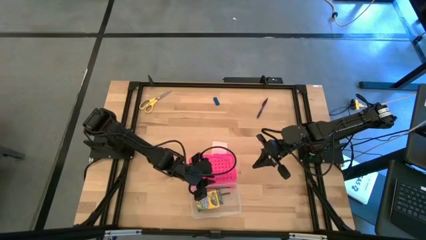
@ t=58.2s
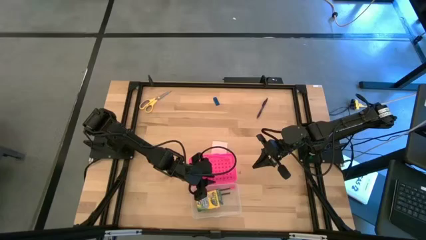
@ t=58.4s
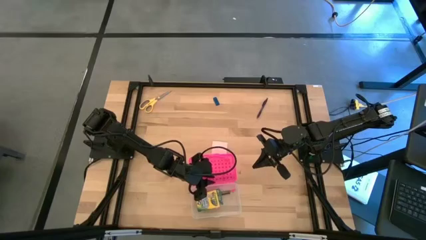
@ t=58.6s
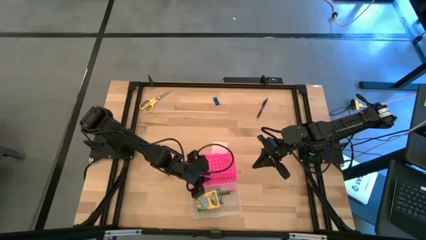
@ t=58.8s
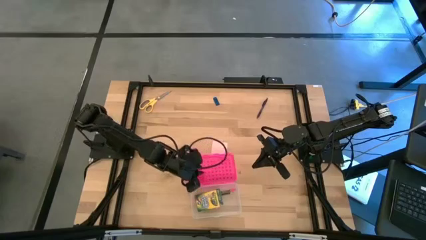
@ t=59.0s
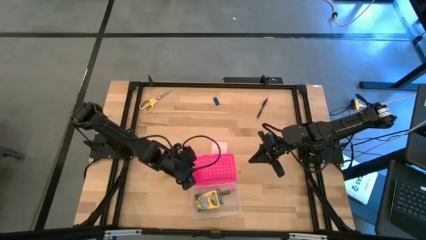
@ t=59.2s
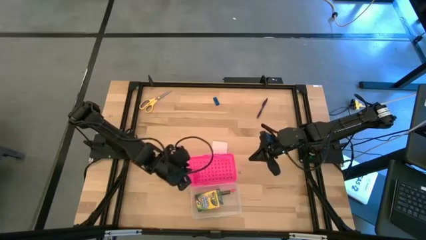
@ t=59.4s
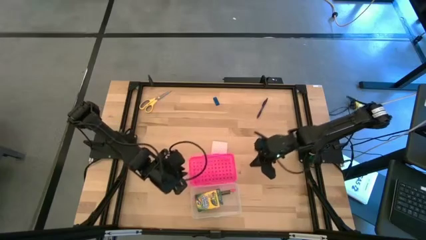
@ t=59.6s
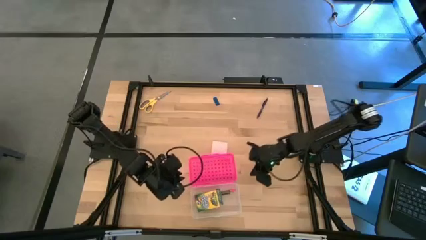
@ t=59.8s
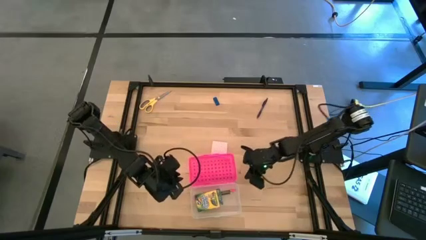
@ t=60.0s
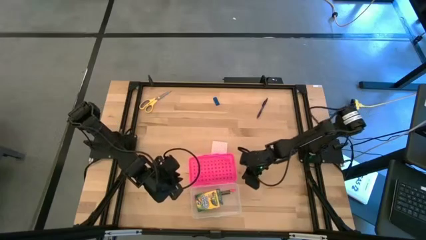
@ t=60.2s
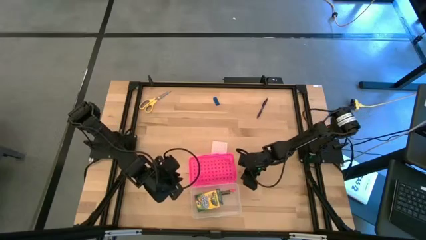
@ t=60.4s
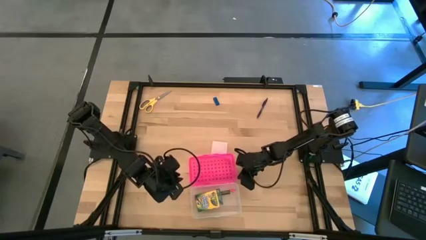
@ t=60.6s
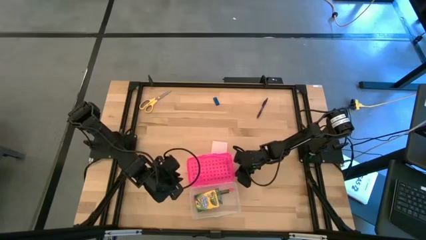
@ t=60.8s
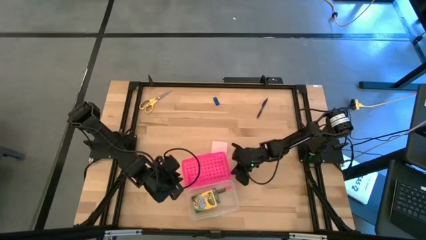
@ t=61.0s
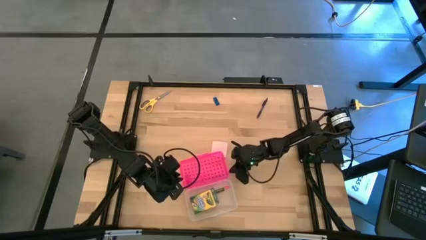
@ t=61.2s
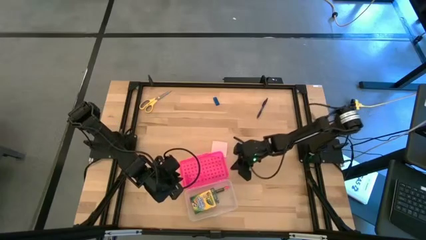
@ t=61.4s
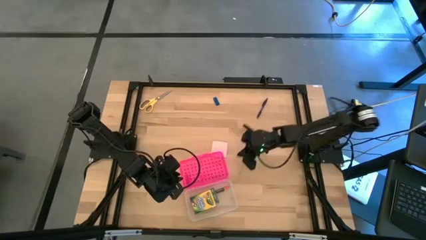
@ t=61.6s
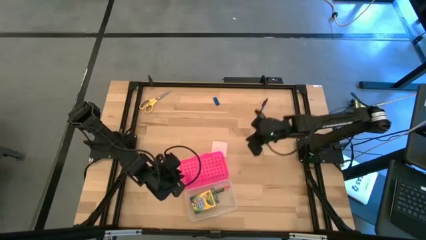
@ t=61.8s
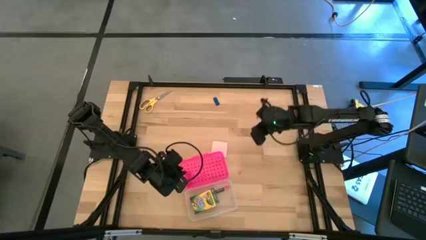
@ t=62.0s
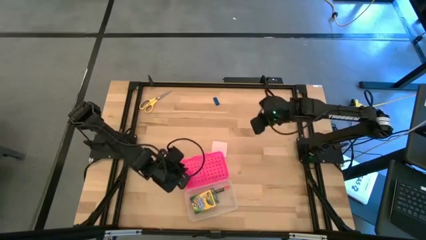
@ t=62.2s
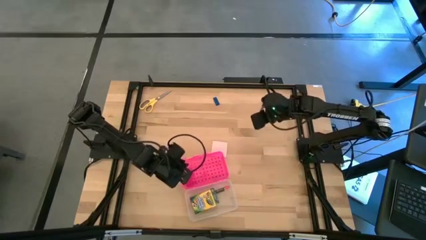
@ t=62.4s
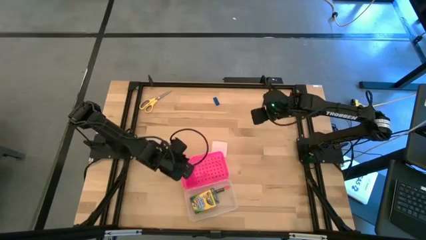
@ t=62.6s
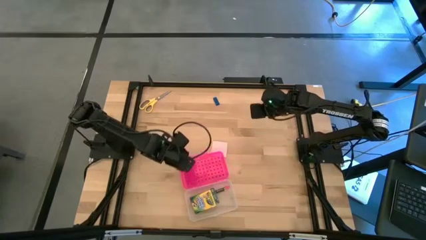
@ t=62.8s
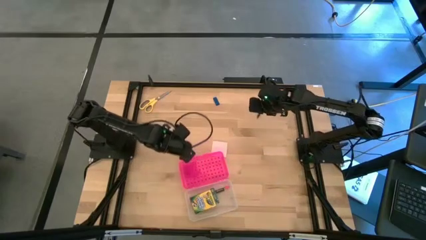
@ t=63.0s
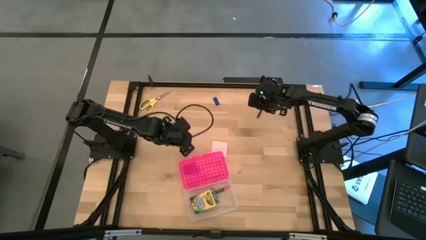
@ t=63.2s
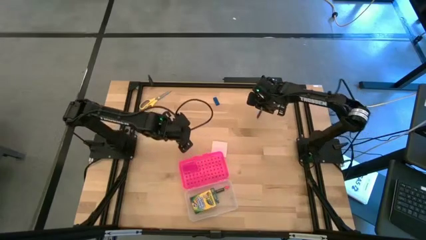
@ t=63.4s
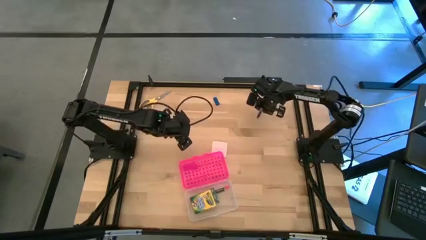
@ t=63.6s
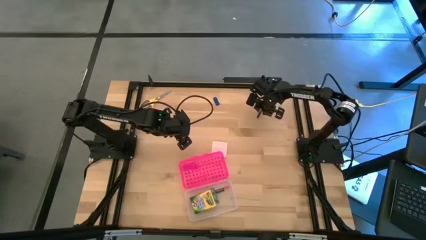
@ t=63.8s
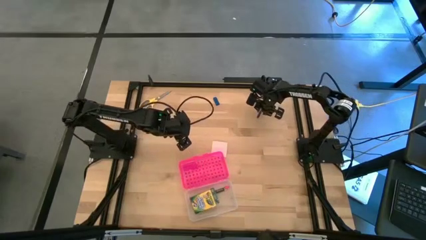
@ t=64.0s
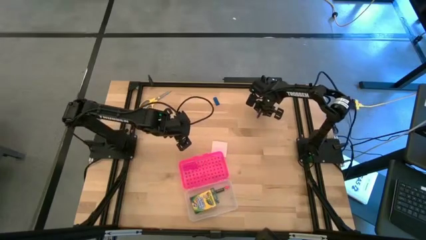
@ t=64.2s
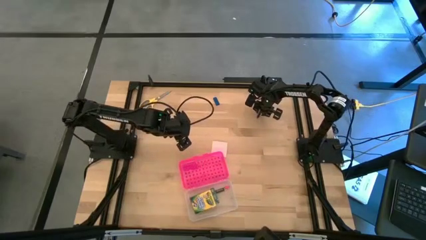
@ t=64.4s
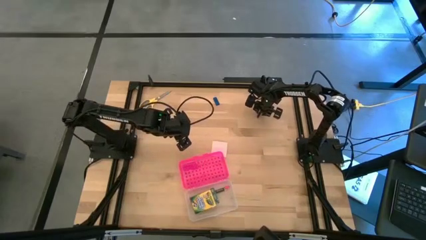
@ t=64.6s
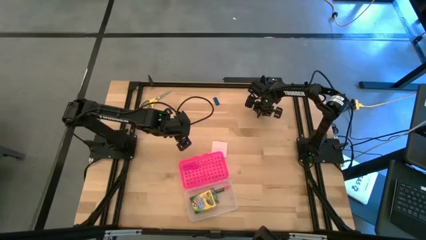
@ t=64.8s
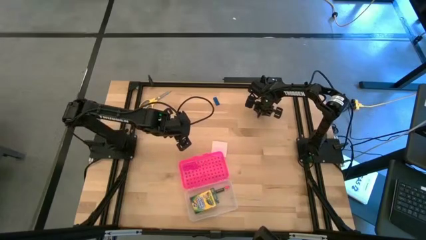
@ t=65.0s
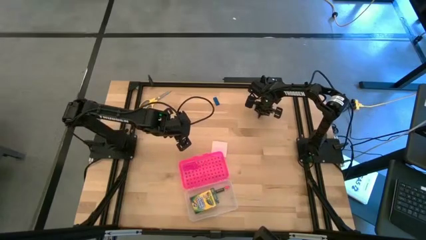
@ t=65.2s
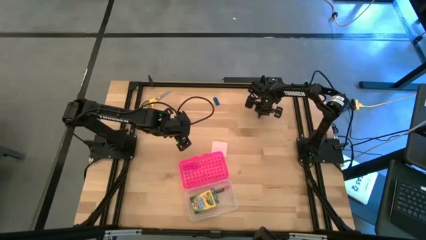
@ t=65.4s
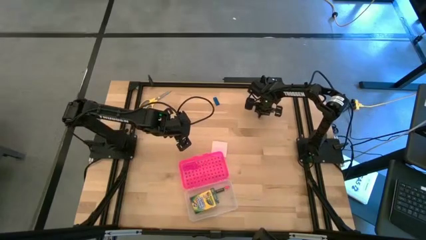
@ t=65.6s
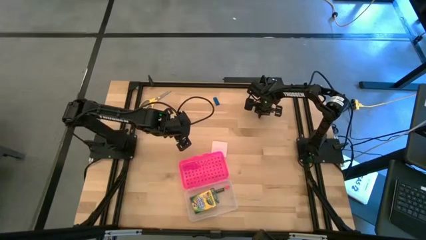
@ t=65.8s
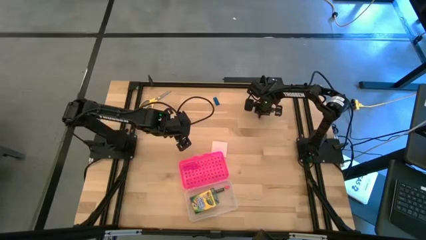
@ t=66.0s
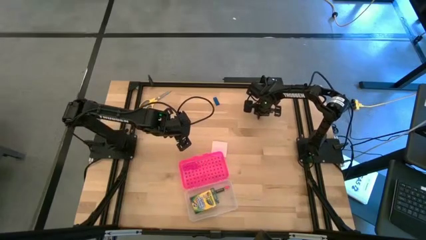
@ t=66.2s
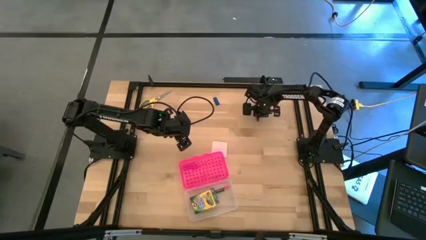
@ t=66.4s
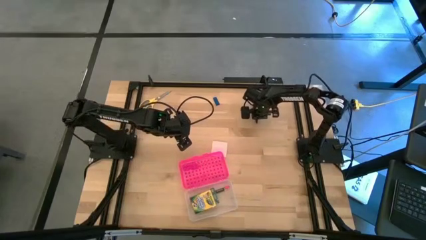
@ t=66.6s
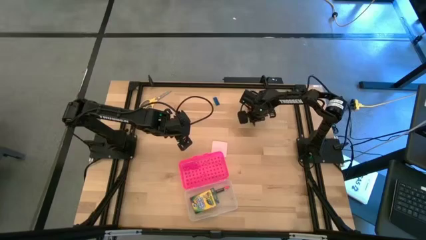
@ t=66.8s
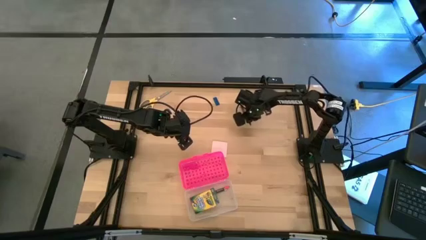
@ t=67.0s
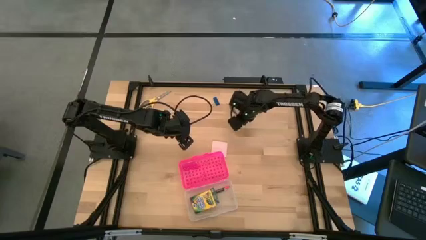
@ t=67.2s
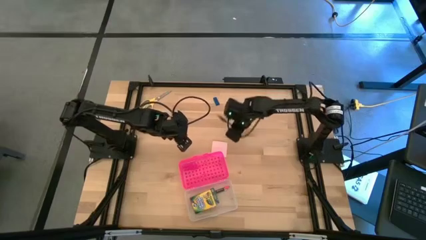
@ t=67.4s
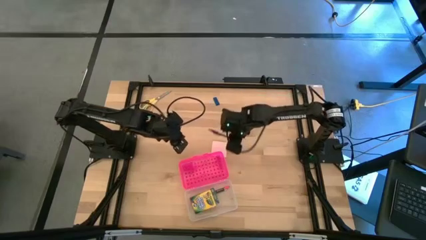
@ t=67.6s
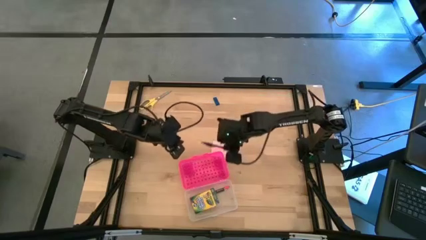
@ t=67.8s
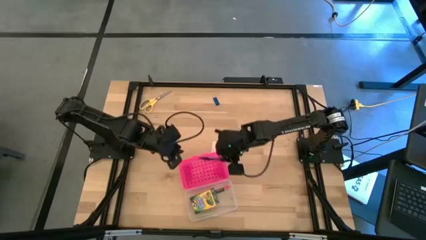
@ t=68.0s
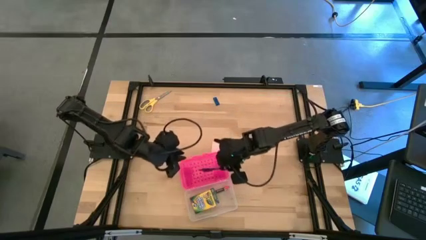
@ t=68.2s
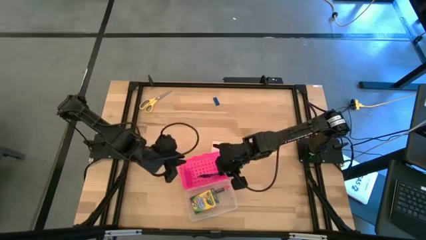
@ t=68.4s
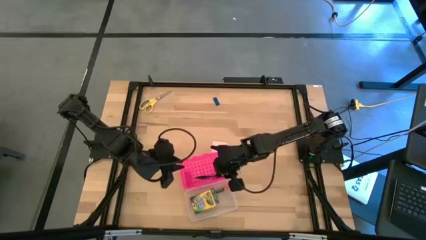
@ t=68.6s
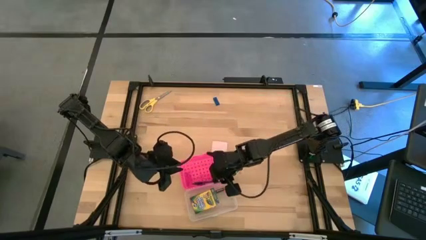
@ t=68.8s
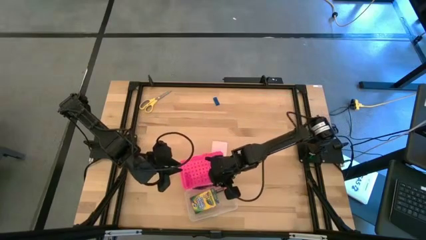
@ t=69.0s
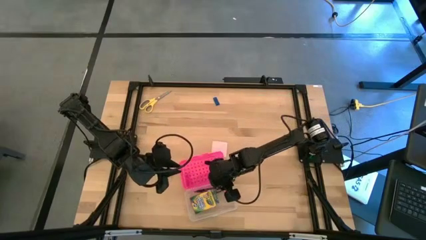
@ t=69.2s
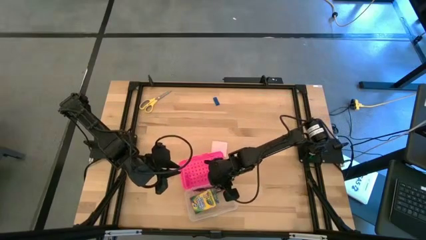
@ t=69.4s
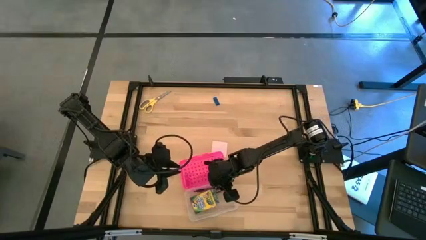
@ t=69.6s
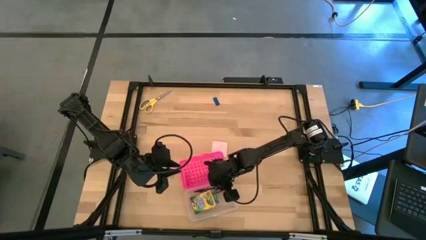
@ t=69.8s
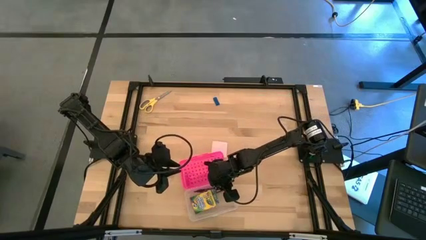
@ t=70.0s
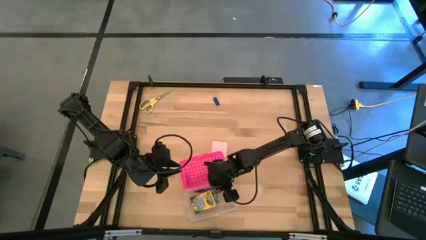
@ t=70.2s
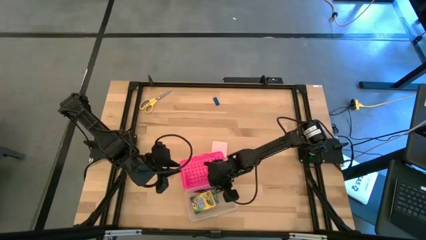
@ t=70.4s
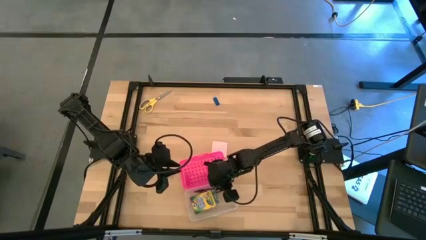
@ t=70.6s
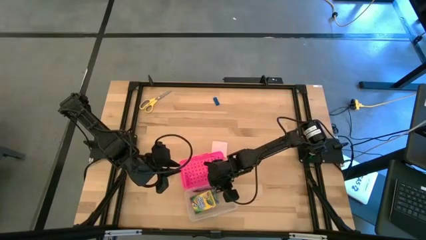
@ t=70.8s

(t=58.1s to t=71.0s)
Task: Pack school essentials
Put the blue pen into the pink supply box
